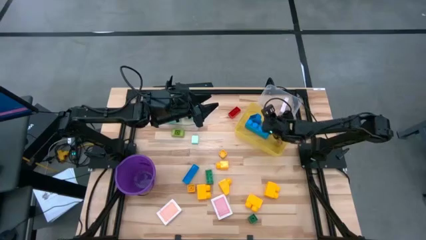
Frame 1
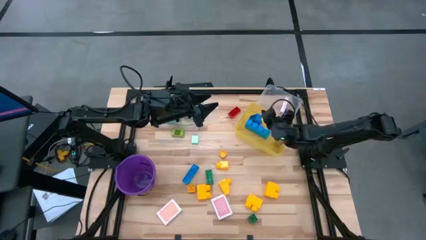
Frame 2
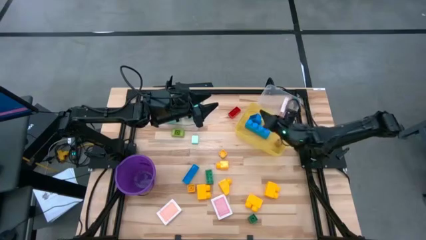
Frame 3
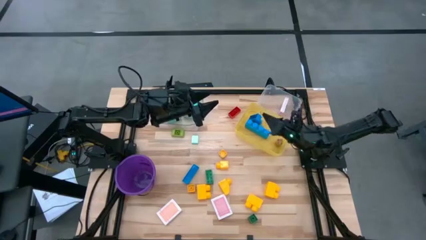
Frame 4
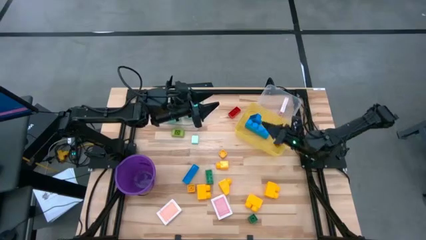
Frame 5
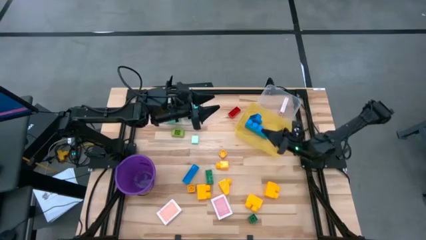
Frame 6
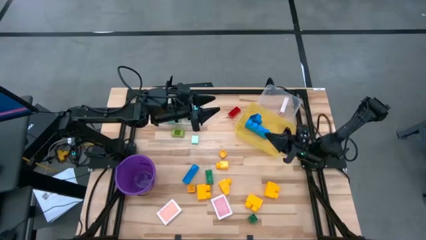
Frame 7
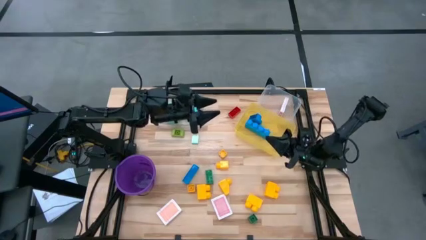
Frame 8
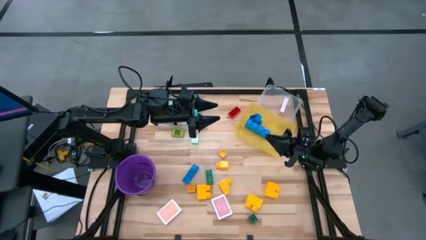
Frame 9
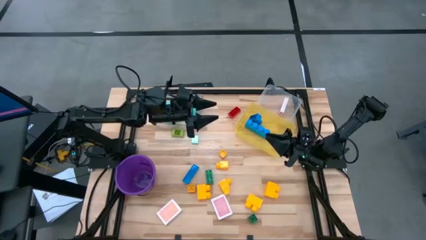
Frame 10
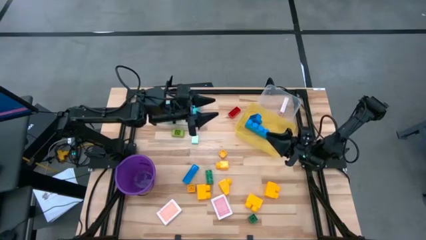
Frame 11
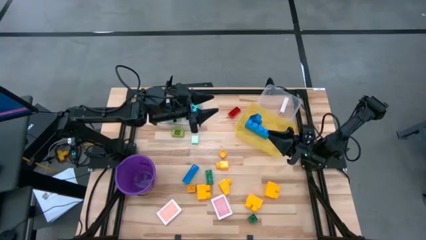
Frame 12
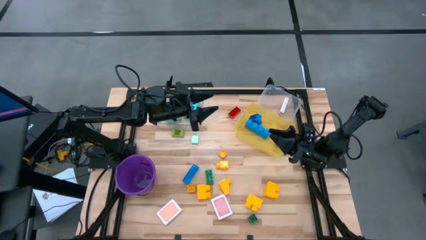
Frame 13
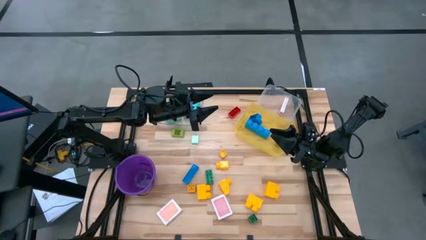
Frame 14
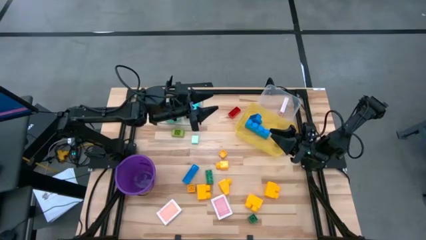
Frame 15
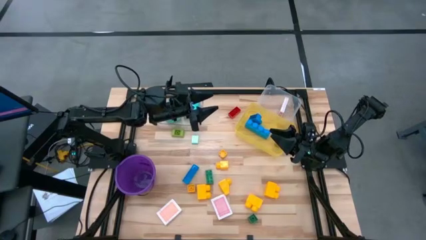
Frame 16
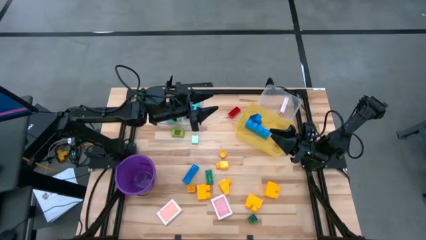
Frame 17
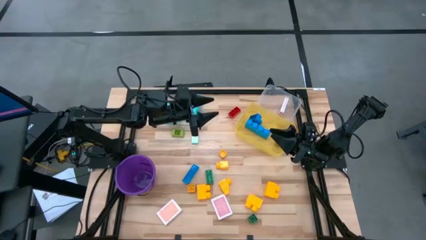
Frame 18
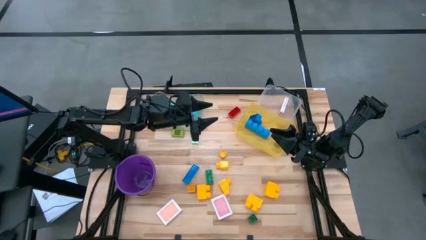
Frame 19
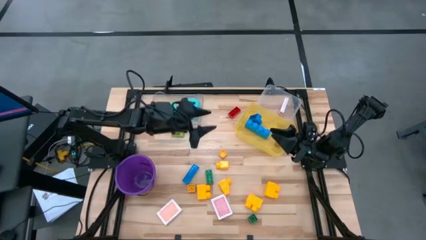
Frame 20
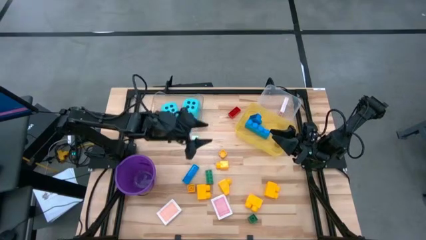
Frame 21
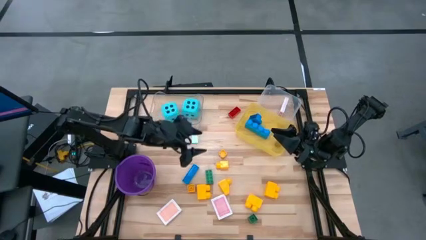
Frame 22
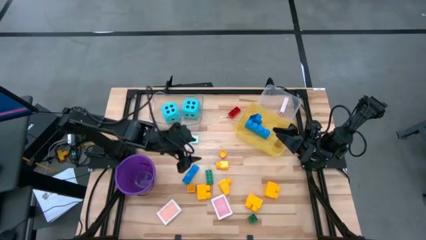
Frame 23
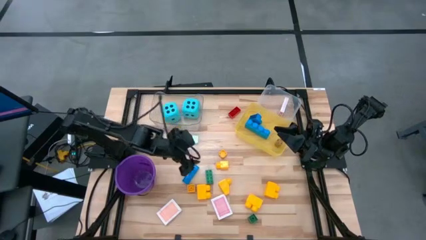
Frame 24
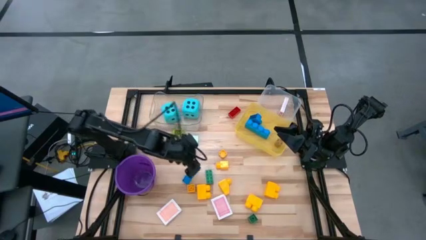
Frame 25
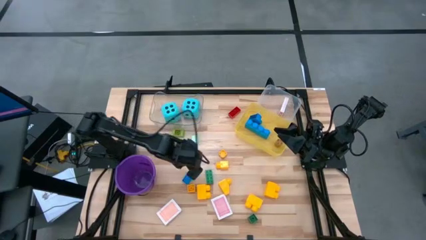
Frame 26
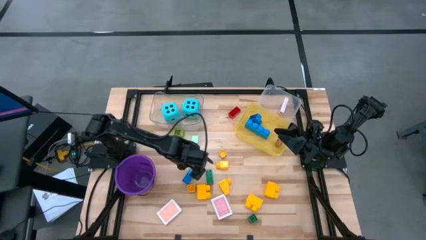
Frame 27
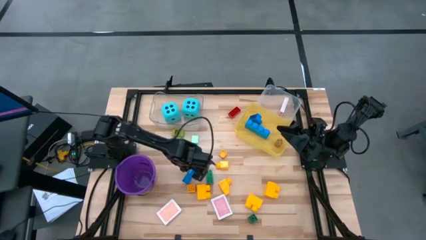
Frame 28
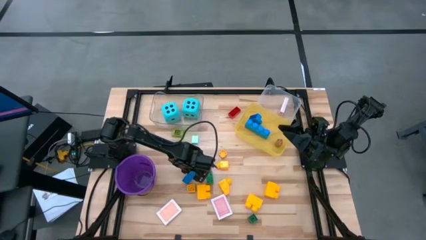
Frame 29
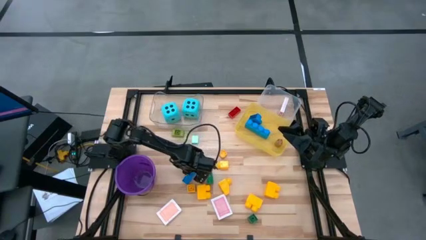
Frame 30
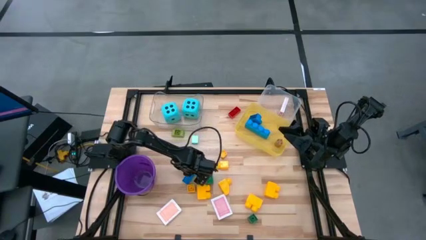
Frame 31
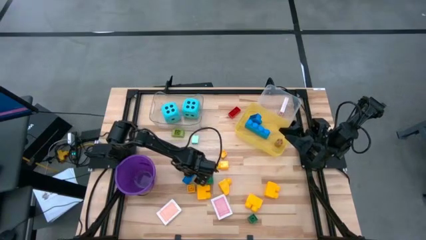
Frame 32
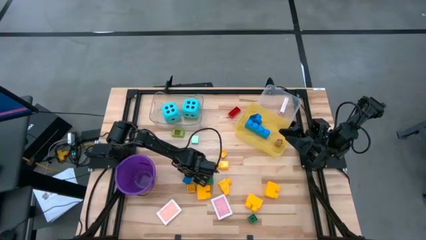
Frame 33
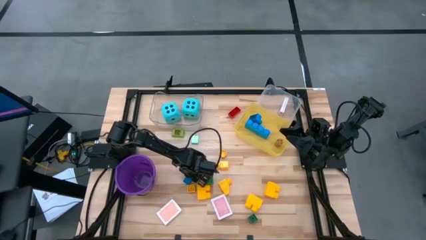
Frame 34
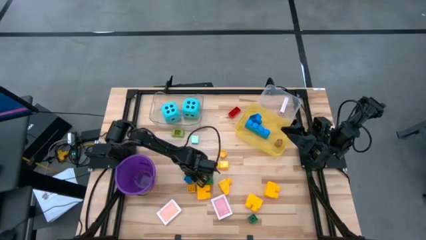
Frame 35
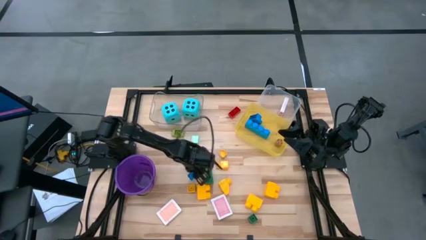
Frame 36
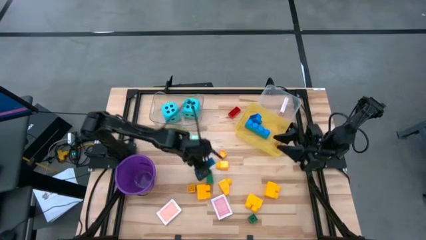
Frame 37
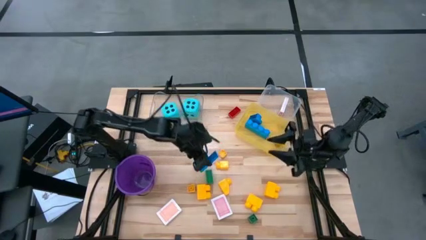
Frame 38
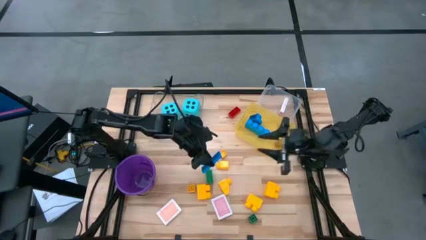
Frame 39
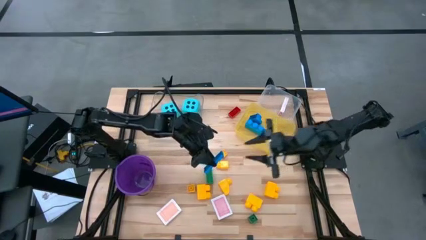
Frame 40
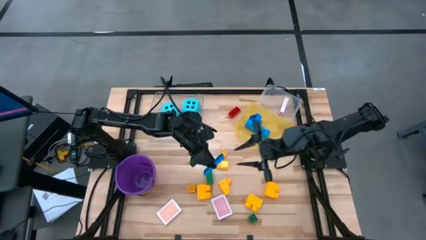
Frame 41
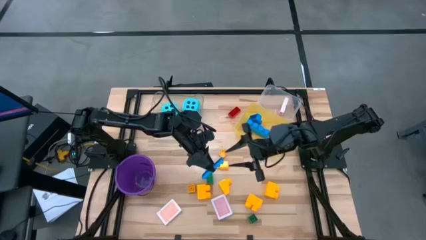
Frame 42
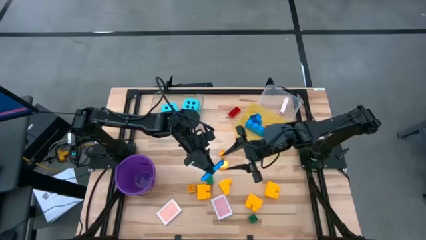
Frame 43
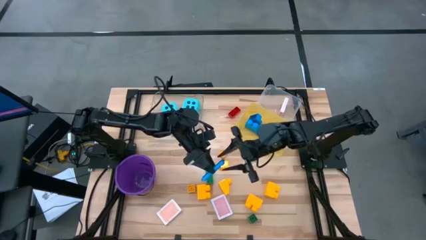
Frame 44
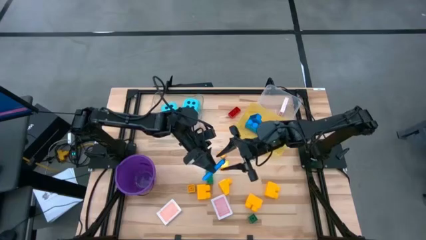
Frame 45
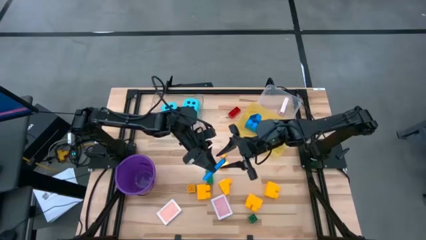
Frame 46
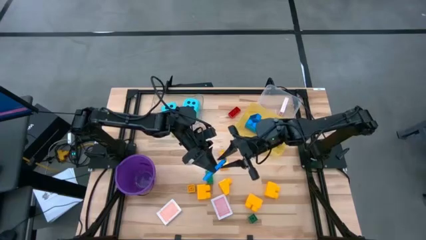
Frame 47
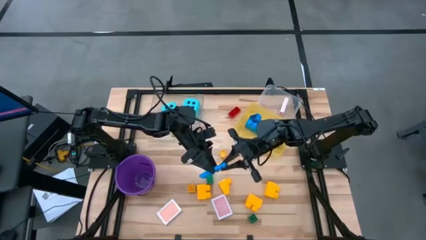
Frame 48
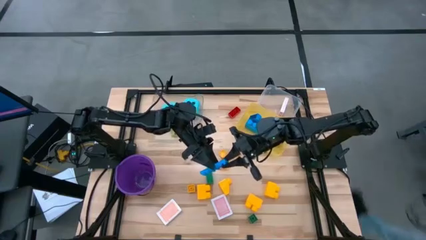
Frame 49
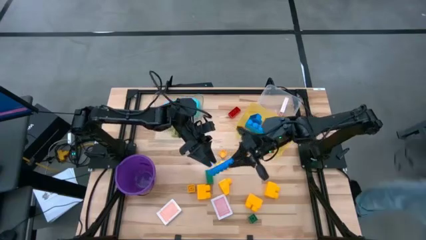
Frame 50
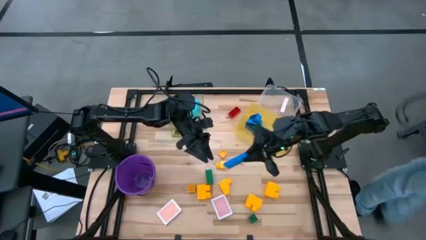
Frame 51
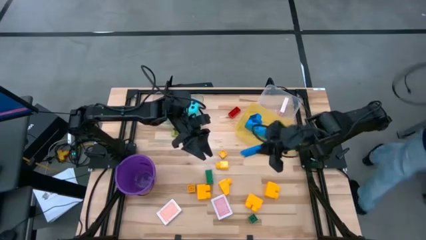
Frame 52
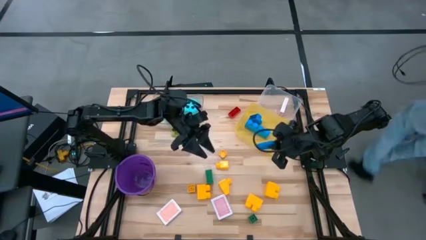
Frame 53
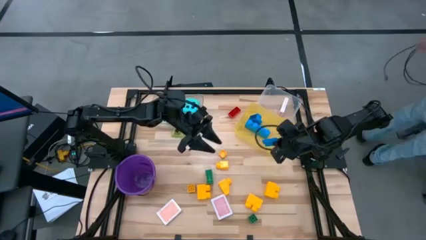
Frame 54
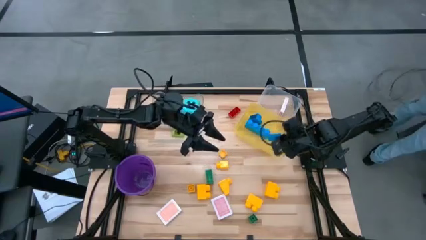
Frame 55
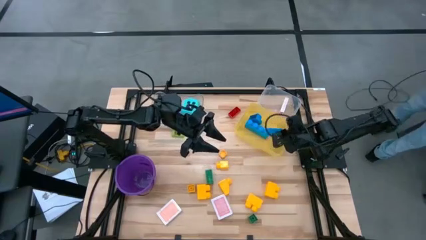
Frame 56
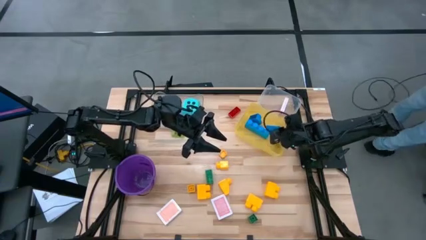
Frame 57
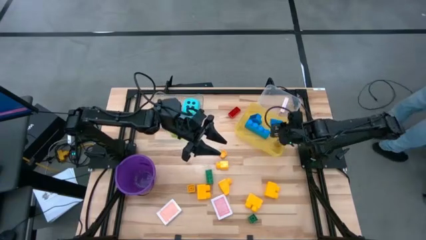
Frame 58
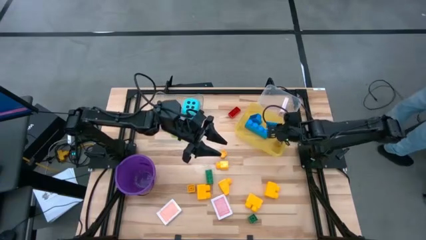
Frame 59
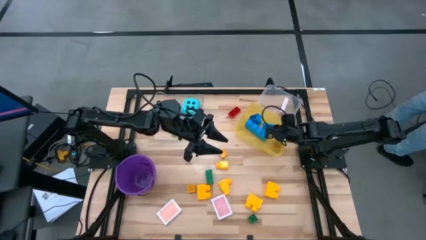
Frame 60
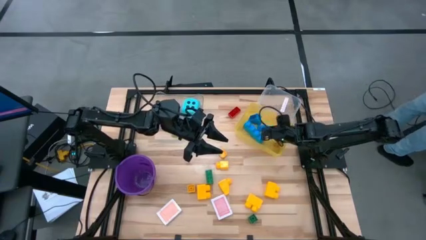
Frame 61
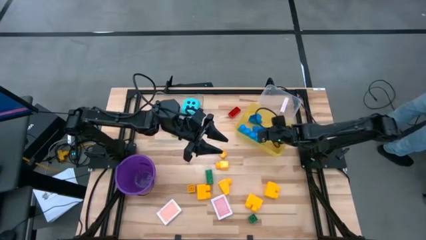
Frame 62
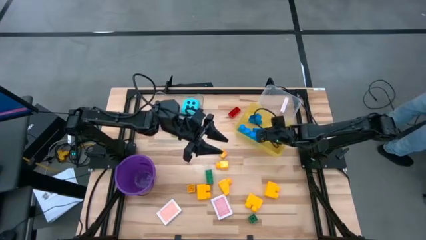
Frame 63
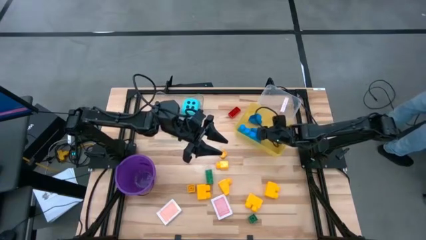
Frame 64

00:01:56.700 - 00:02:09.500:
Task: Pick & Place Toys
Put the blue game piece into the yellow bin
